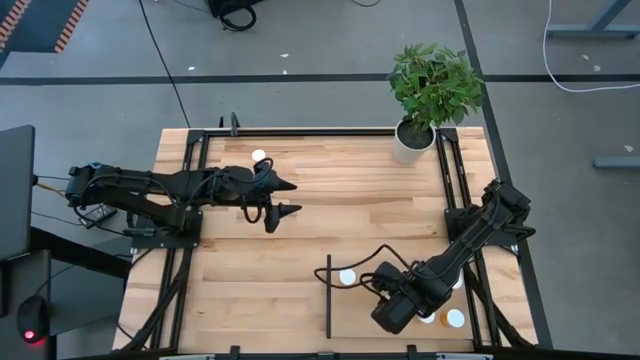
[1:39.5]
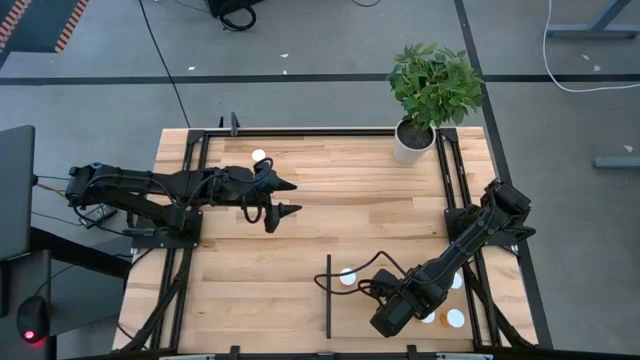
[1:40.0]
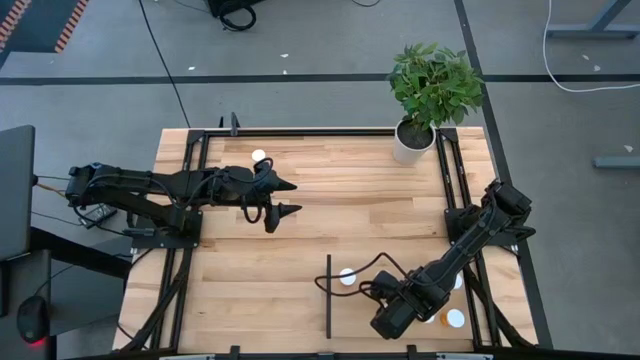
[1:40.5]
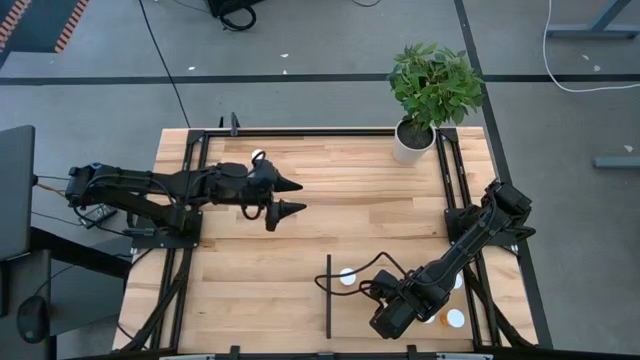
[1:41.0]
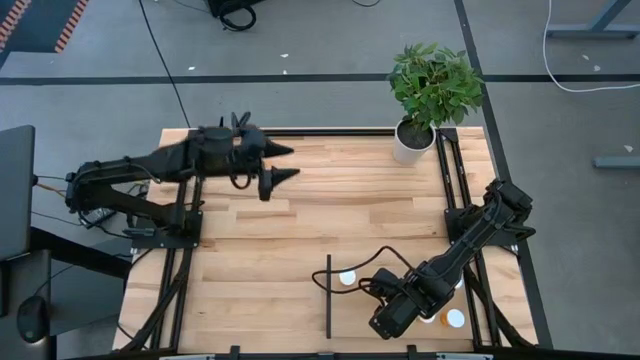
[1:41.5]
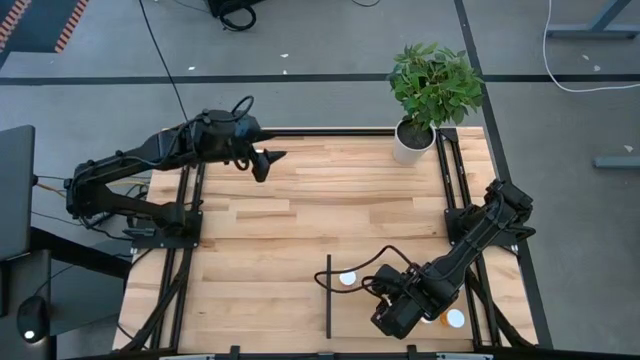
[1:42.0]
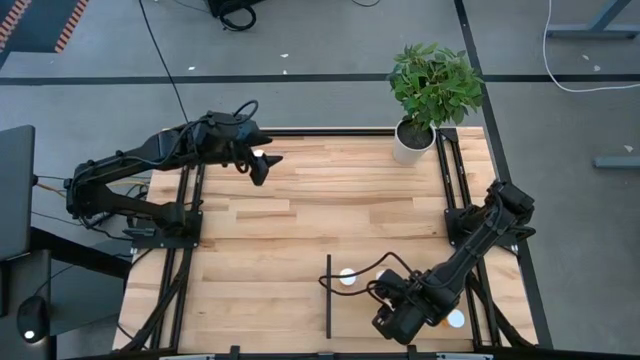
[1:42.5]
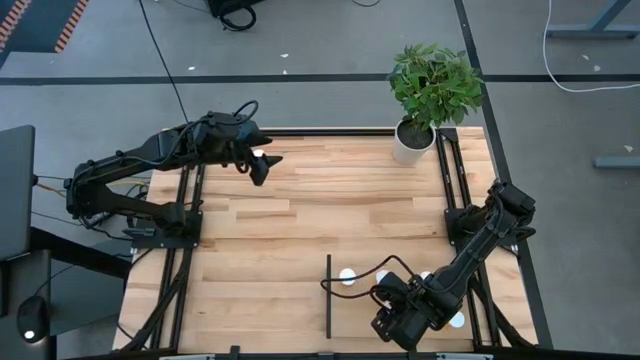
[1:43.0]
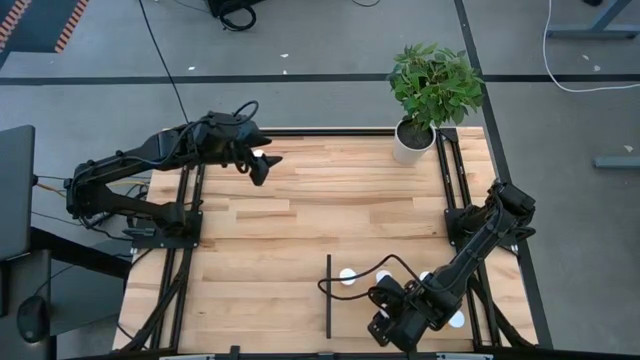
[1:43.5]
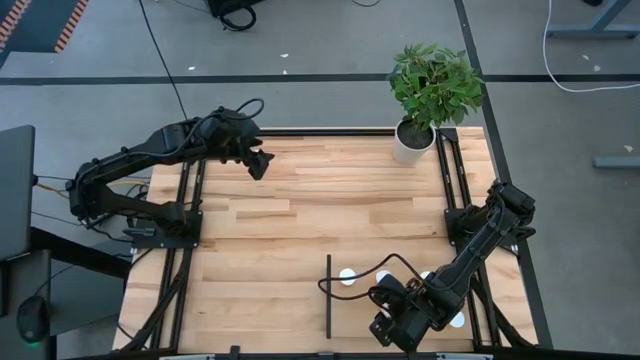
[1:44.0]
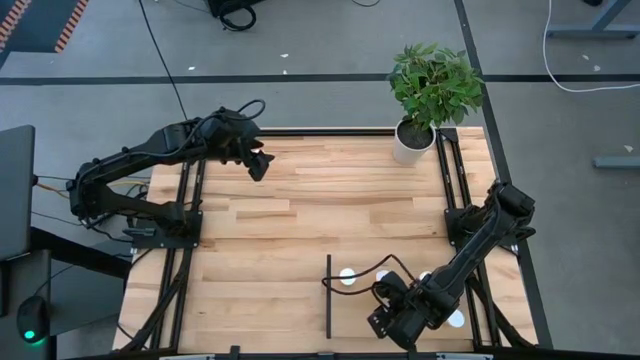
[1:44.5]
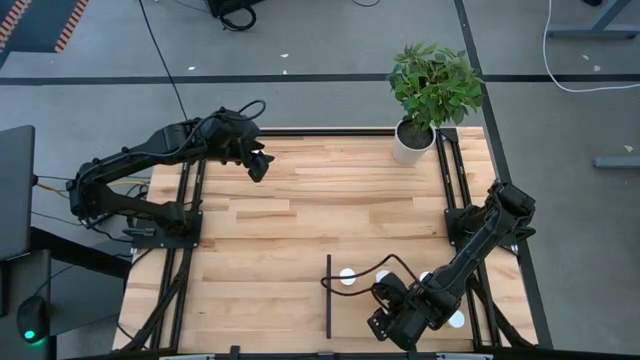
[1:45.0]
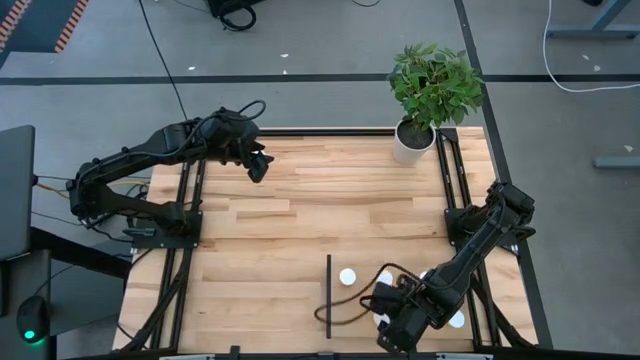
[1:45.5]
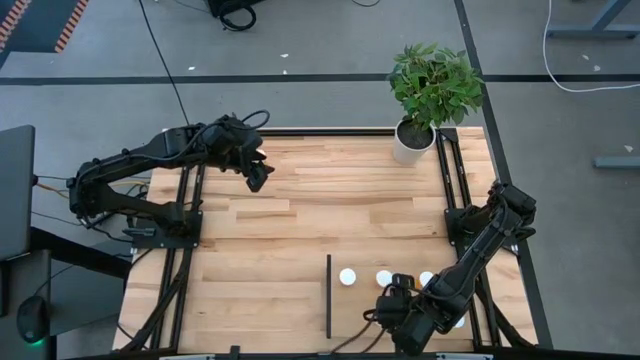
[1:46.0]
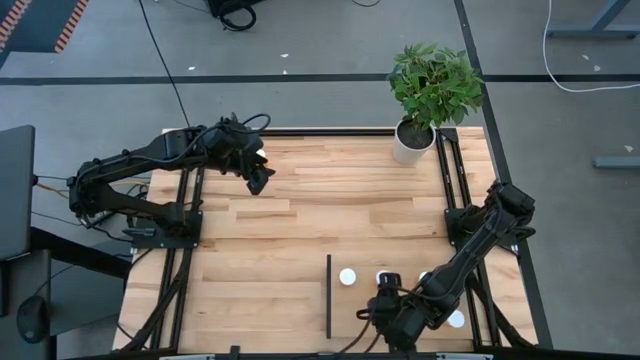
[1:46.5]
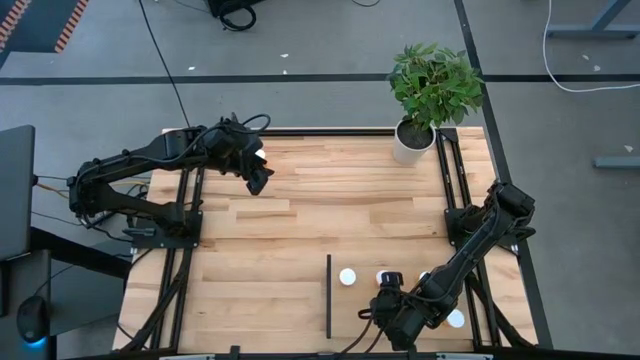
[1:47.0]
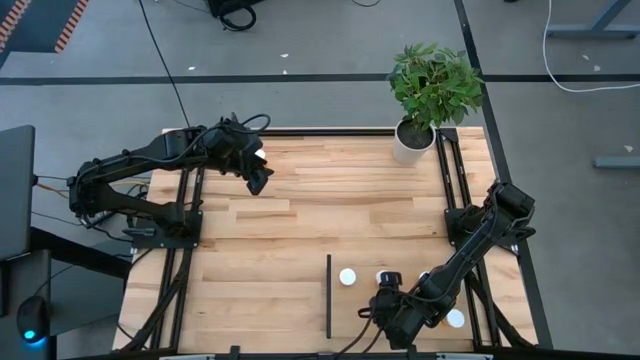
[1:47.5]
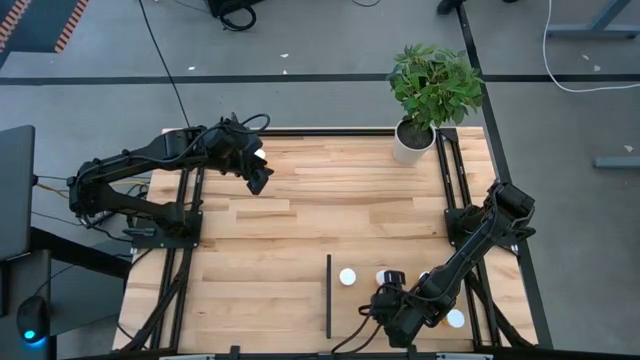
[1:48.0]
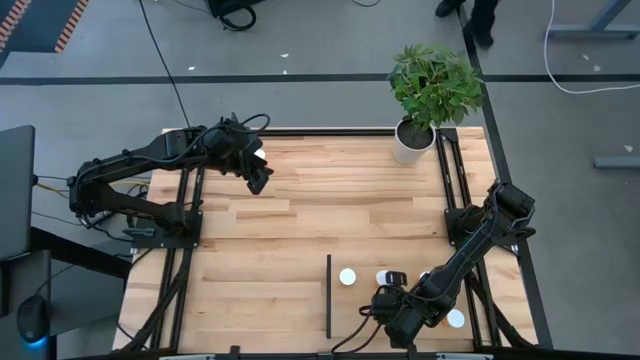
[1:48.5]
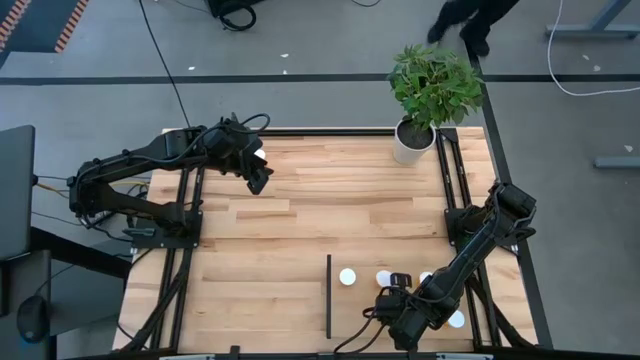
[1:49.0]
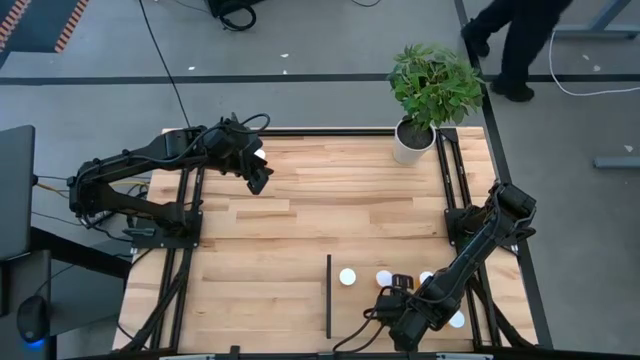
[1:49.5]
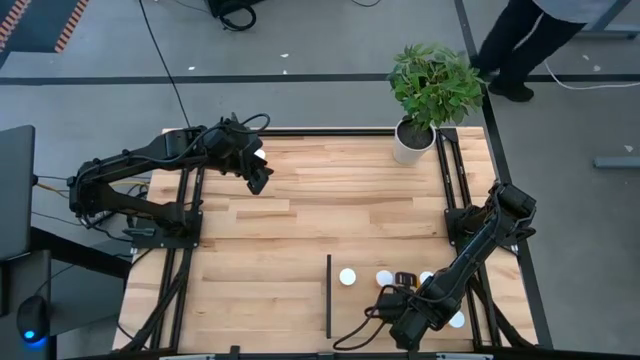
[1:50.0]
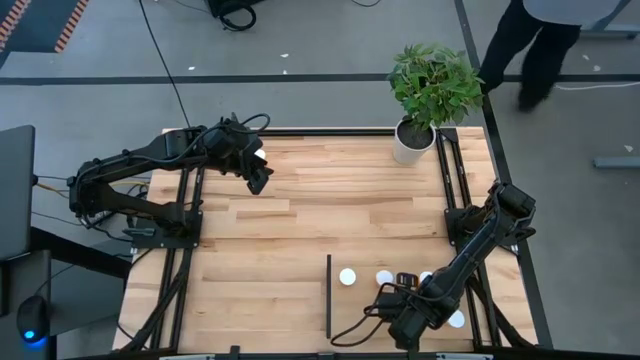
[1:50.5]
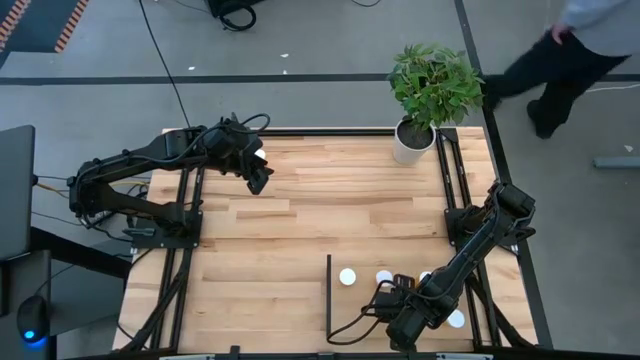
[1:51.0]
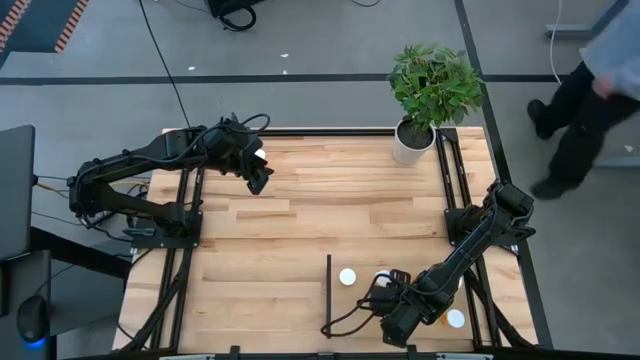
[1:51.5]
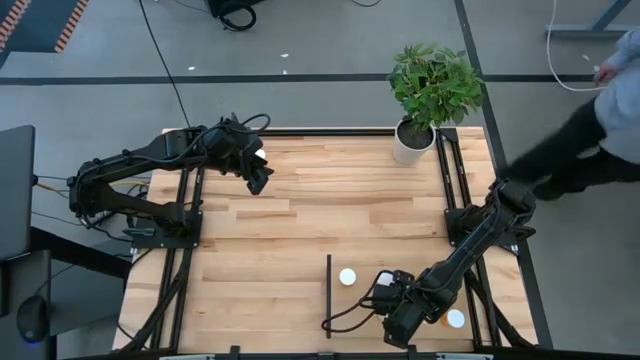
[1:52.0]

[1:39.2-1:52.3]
Task: Pick and place medicine bottles onto shelf by color
Put the orange pill bottle on the shelf aligned with the other orange pill bottles

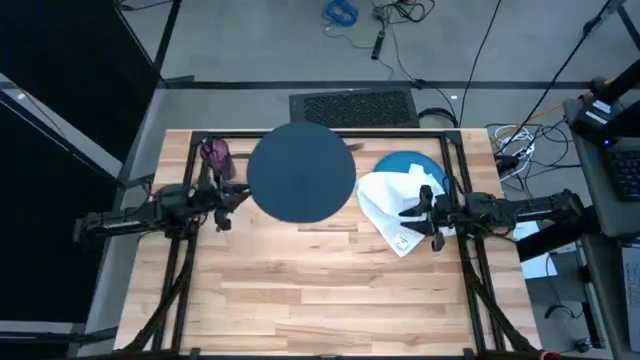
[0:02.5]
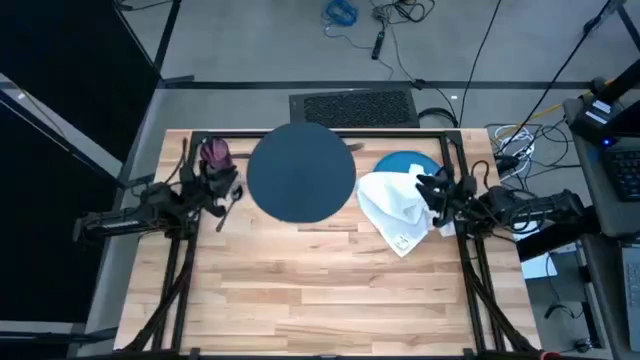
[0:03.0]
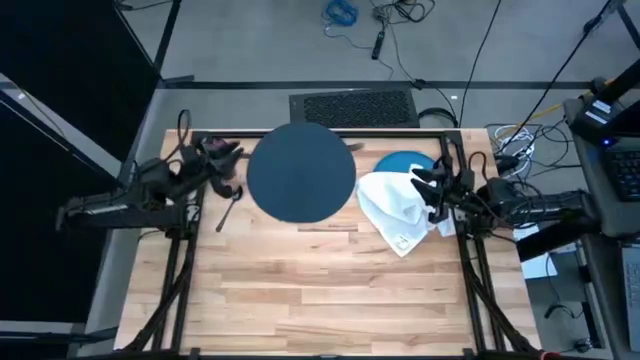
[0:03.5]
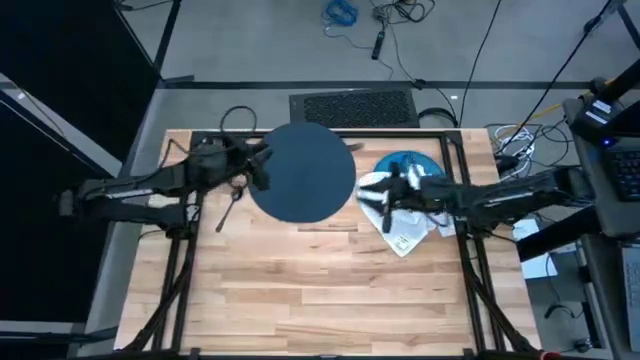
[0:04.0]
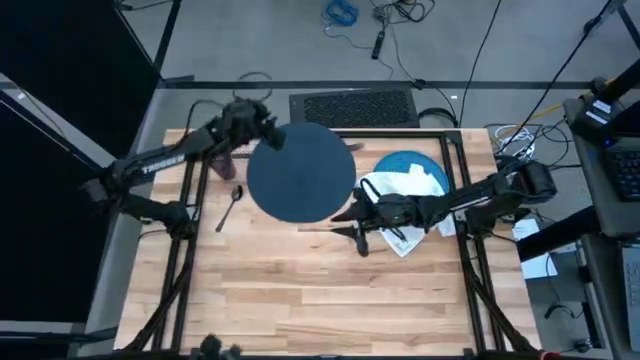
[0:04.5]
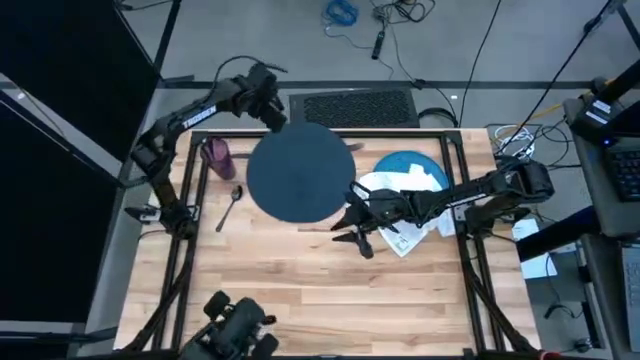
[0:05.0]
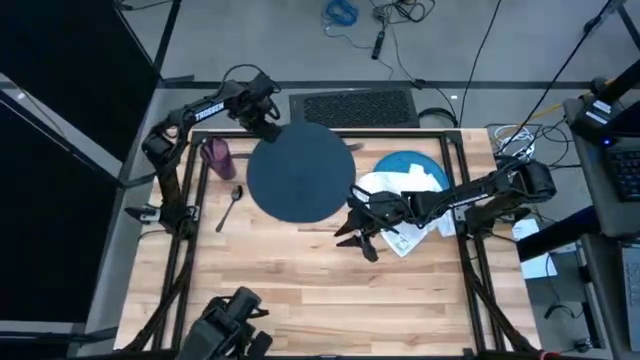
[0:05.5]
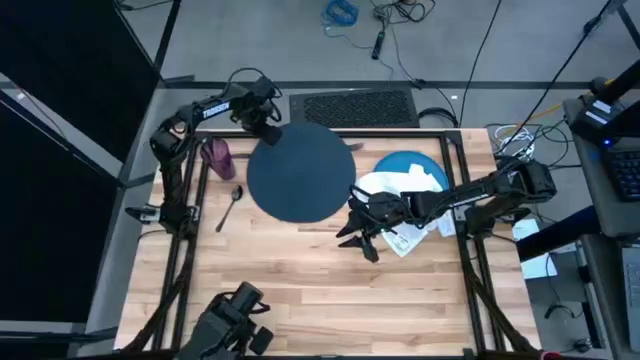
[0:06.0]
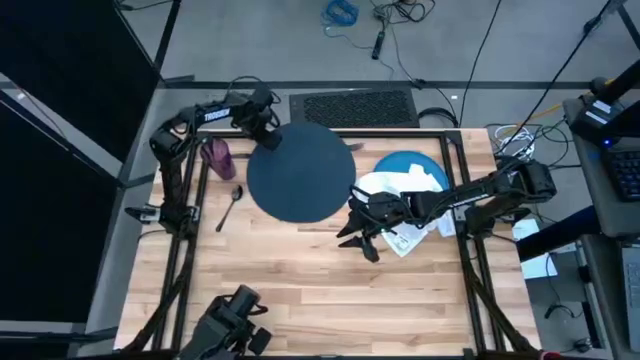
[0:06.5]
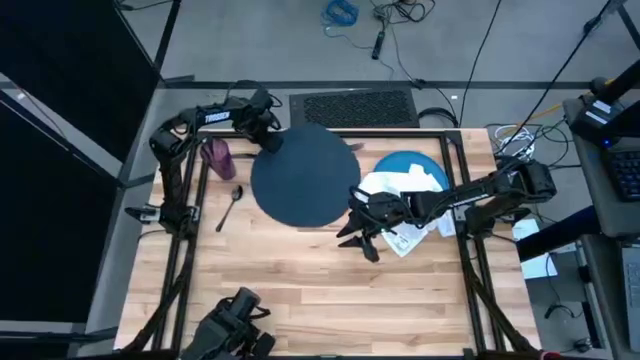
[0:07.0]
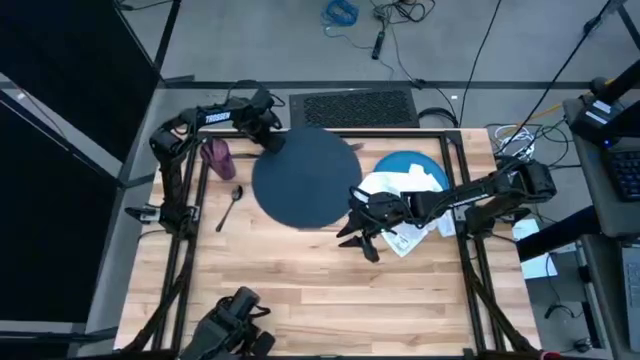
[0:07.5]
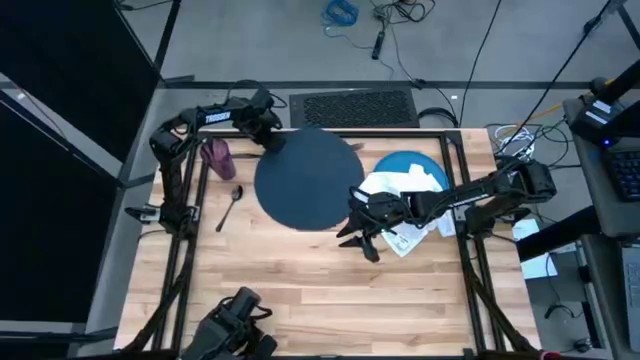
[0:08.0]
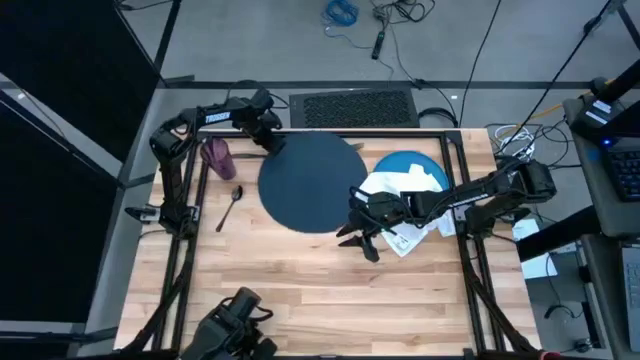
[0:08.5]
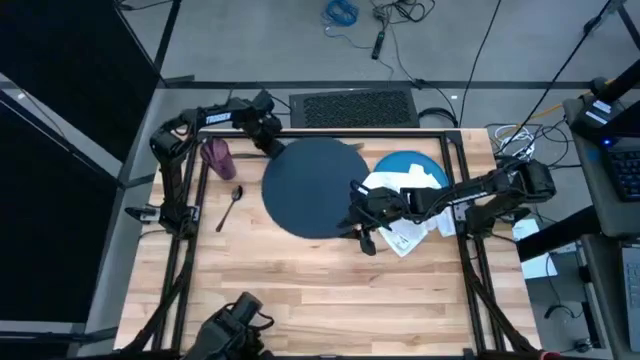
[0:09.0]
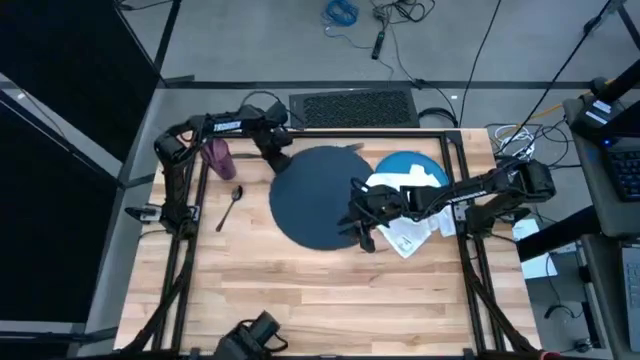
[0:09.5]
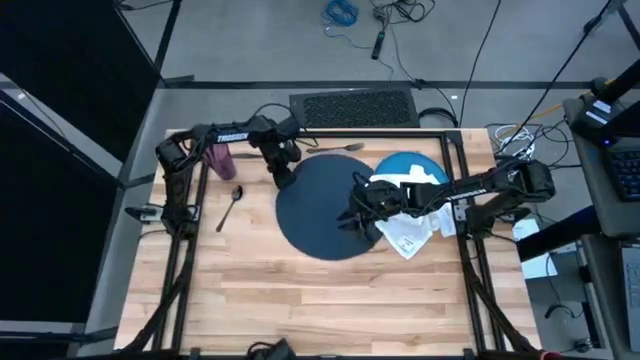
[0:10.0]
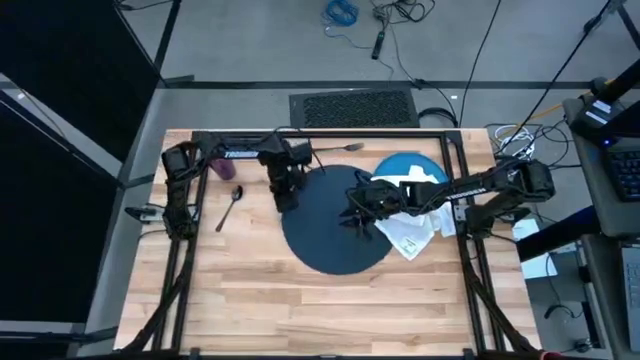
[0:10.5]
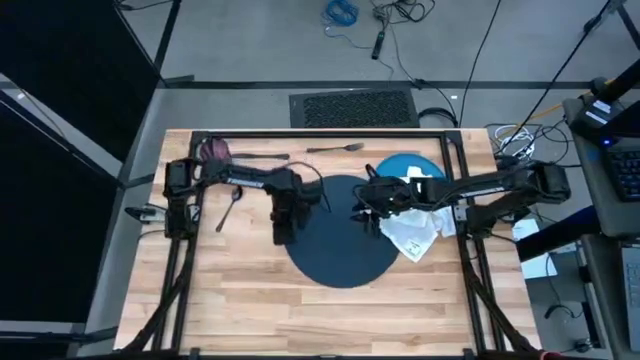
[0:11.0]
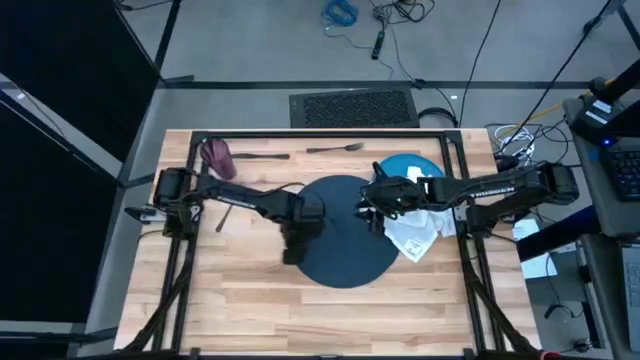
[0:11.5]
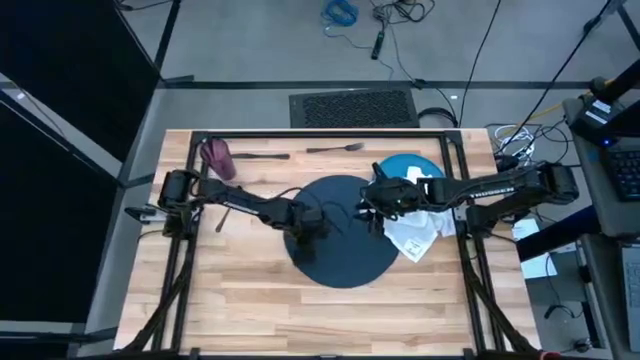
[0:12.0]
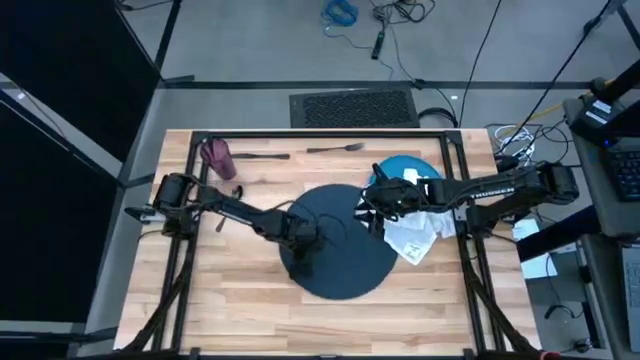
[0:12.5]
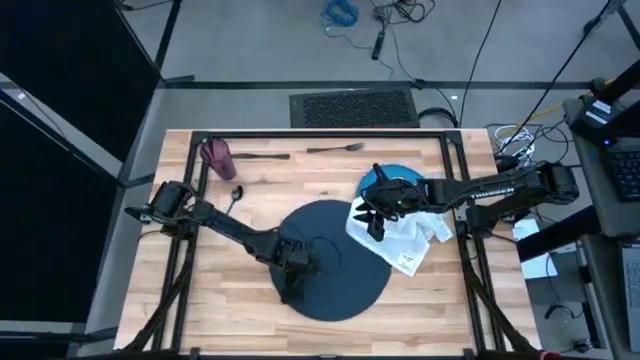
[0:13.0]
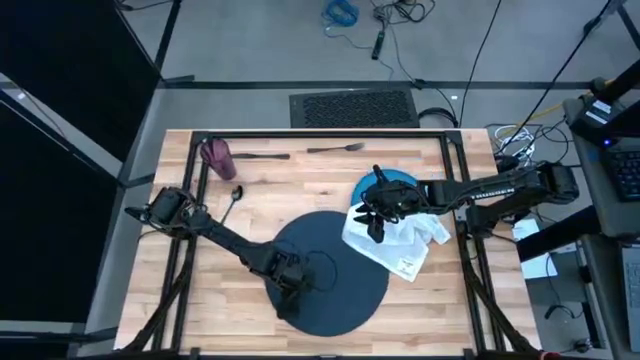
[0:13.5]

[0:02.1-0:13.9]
Task: Set table place
Move the table mat from the top to the center of the table
